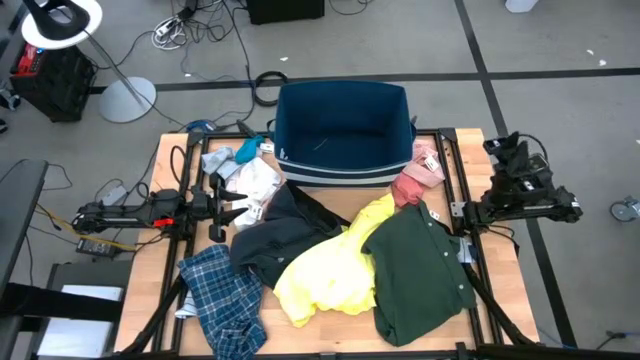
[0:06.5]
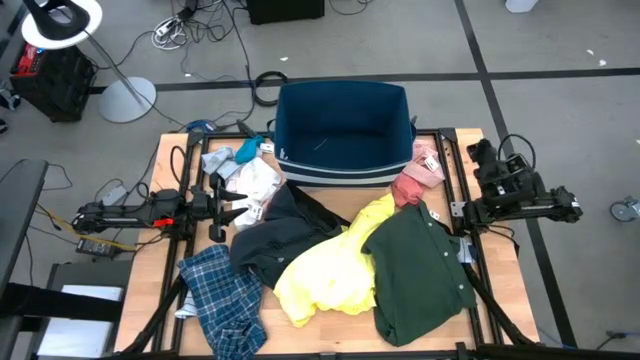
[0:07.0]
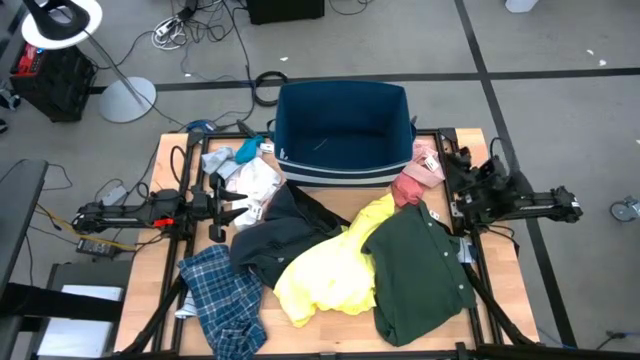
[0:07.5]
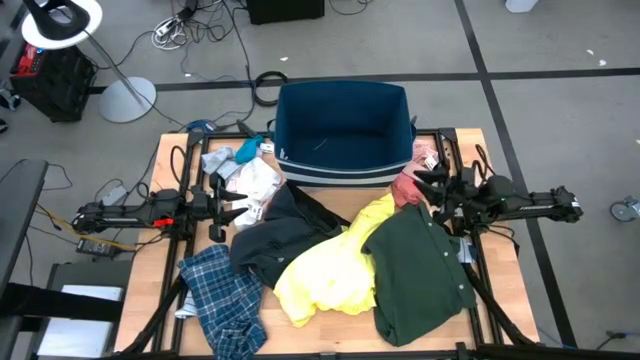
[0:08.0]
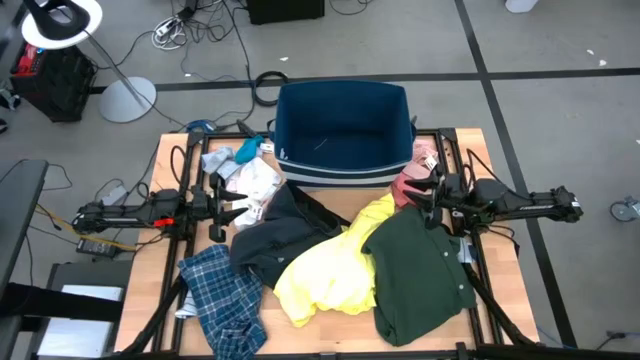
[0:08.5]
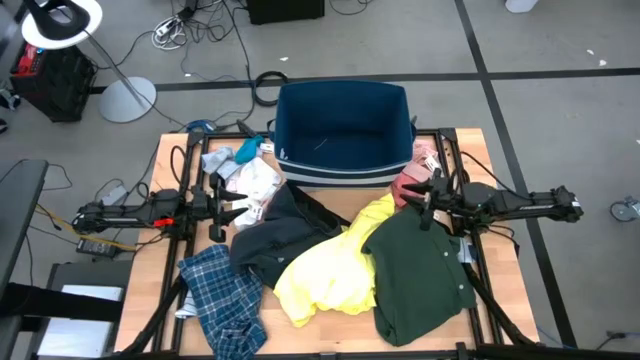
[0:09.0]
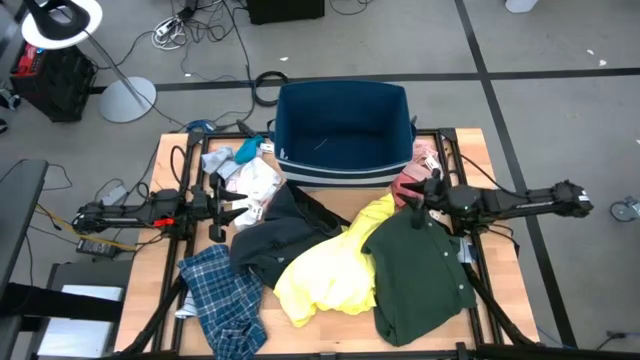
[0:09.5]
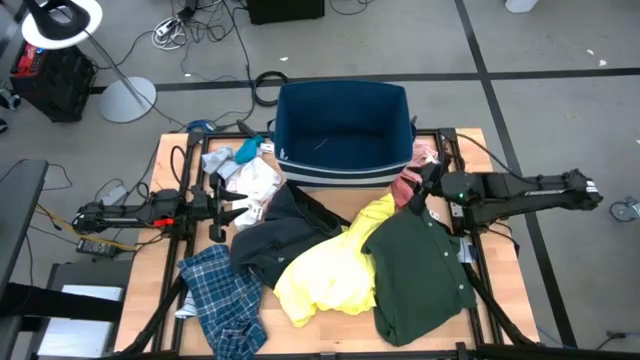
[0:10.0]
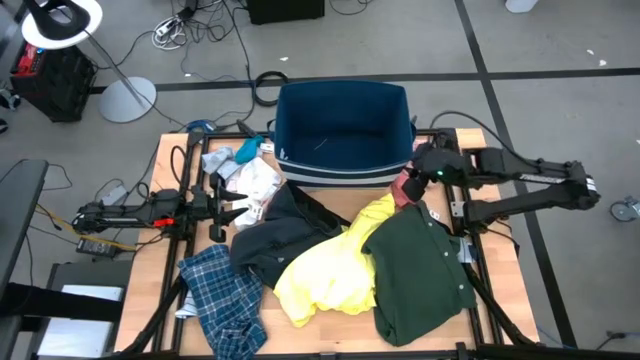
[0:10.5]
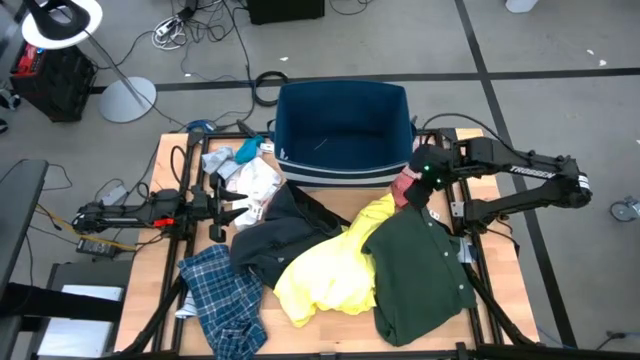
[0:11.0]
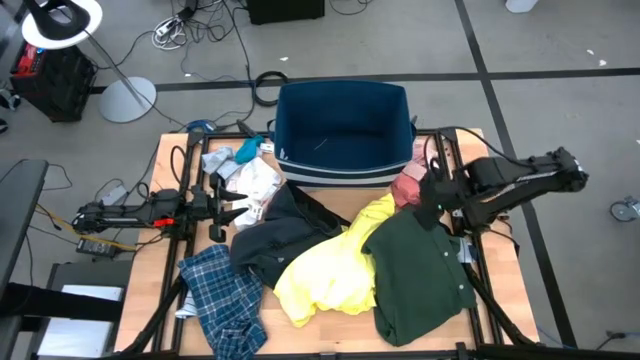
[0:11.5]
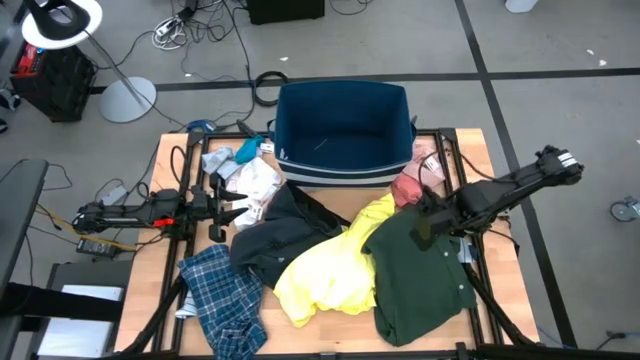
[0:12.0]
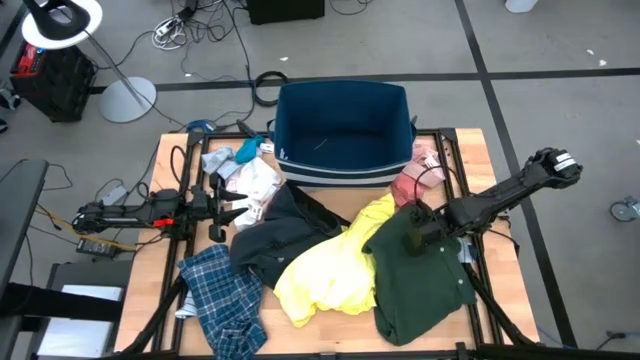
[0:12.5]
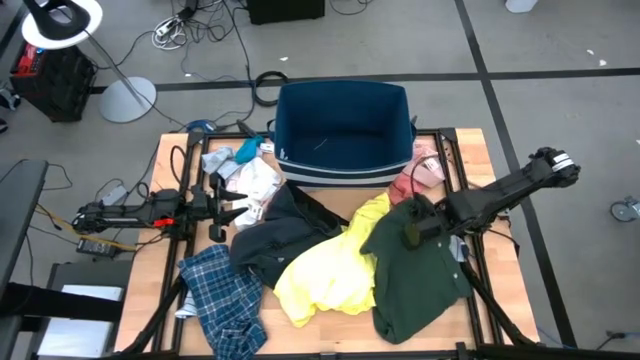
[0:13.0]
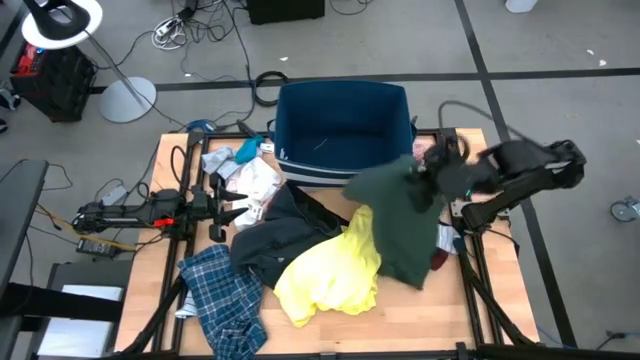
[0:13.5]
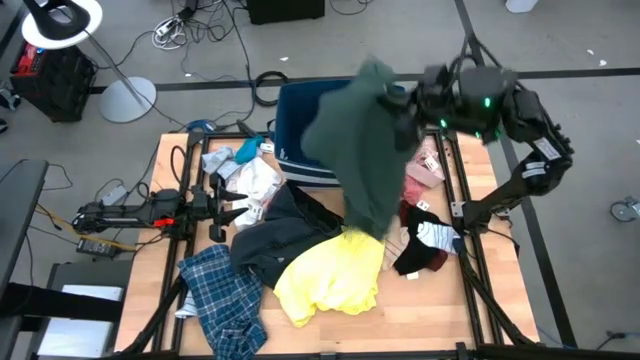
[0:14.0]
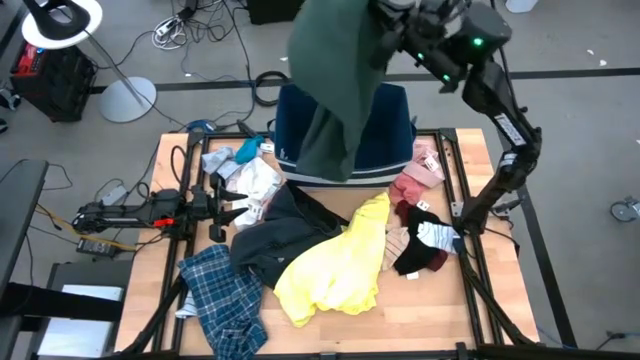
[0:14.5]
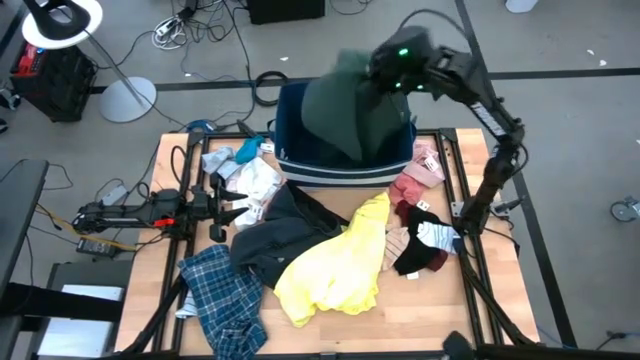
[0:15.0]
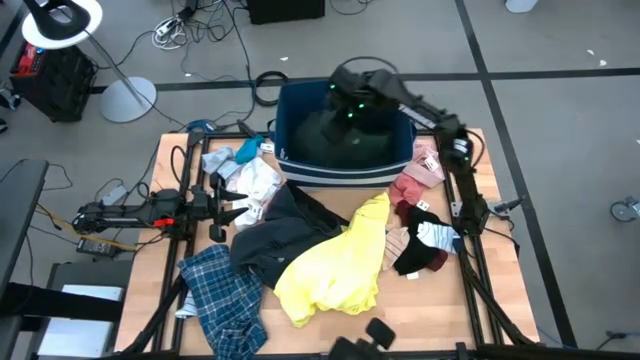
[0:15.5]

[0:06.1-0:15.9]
Task: Sort clothes
Put the green shirt into the blue bin

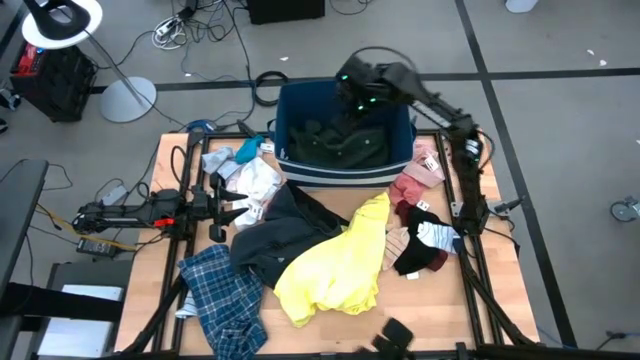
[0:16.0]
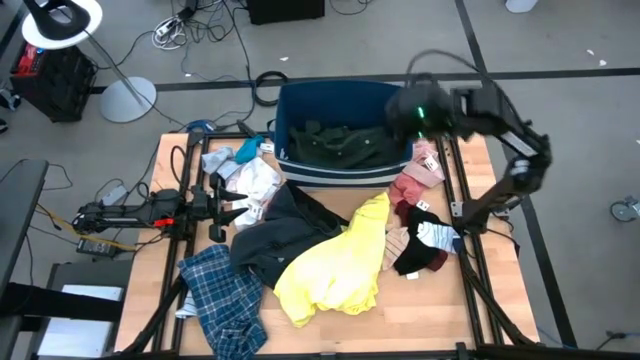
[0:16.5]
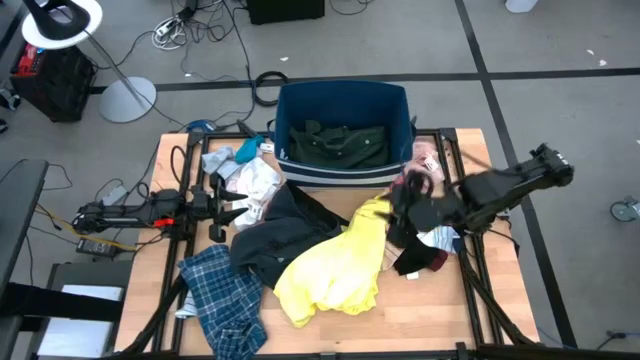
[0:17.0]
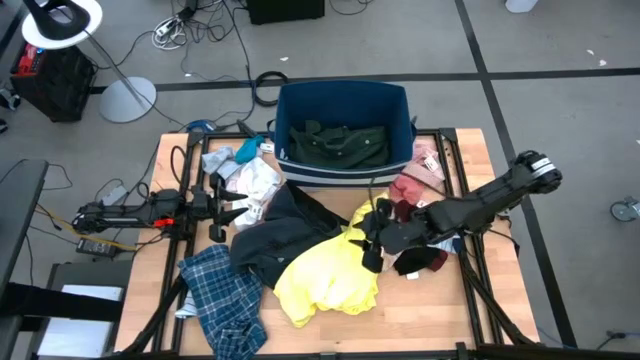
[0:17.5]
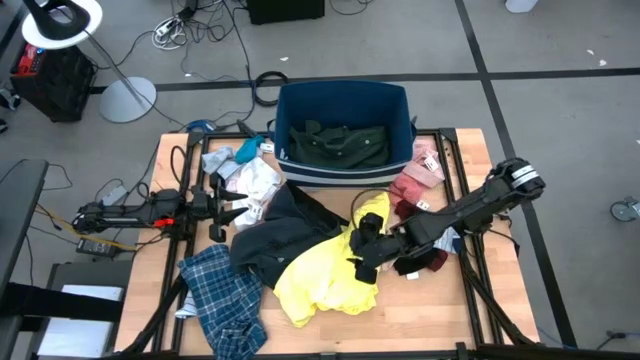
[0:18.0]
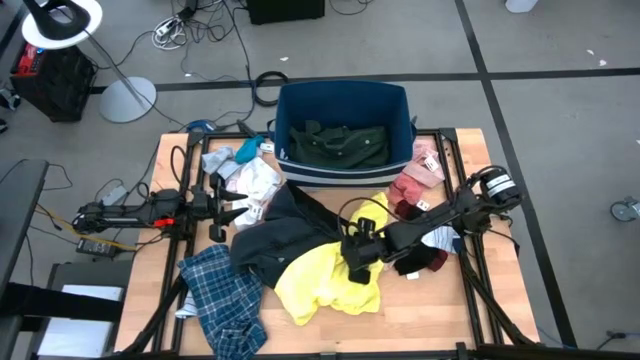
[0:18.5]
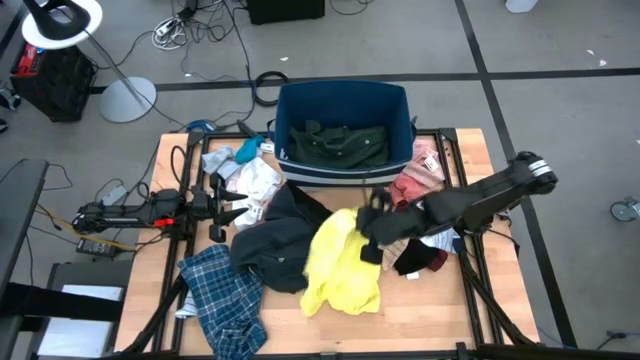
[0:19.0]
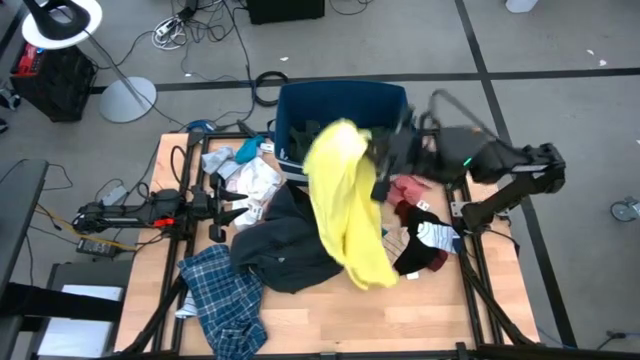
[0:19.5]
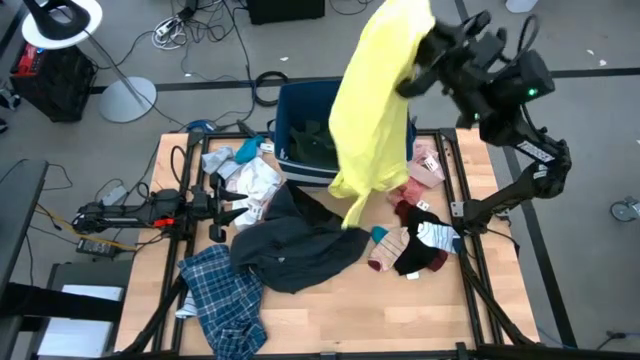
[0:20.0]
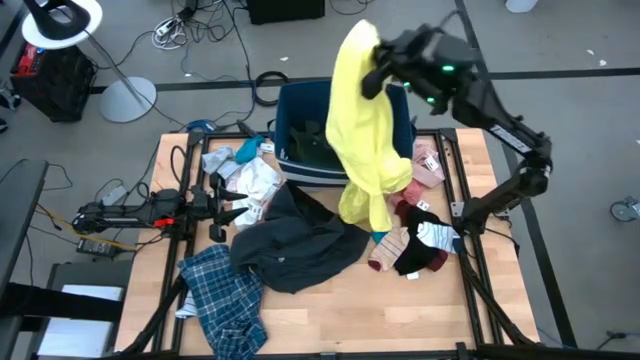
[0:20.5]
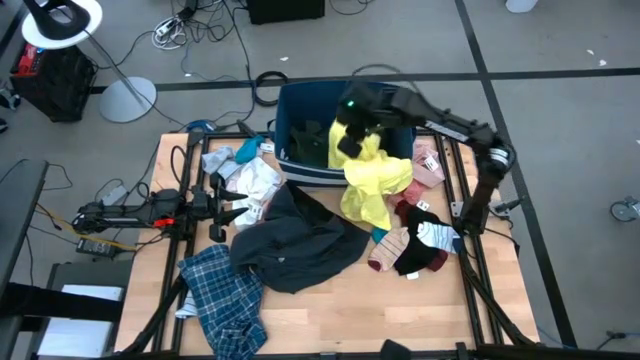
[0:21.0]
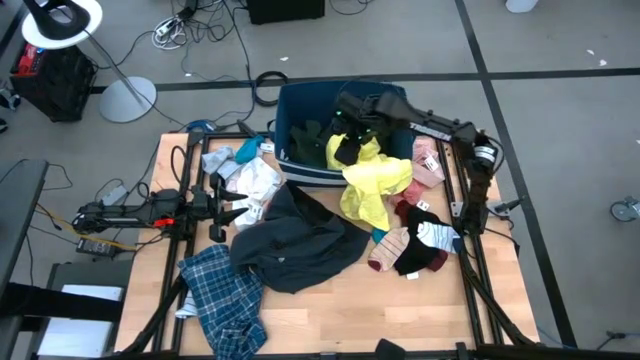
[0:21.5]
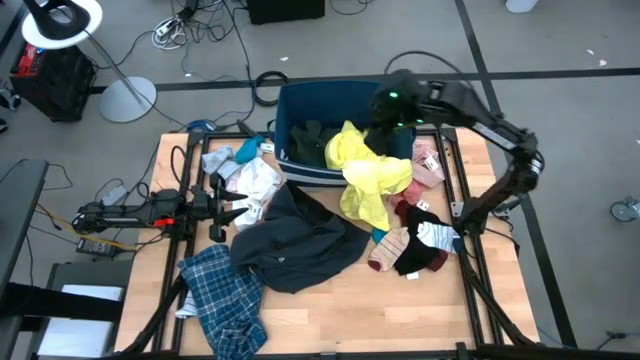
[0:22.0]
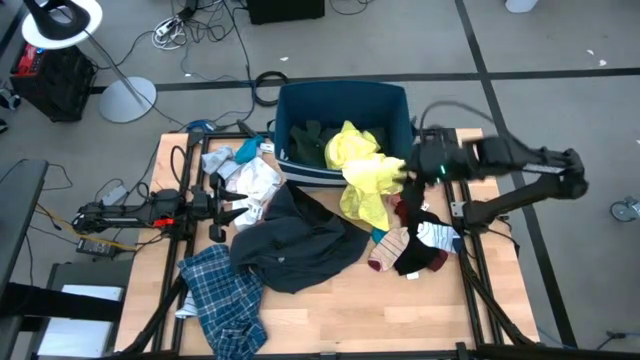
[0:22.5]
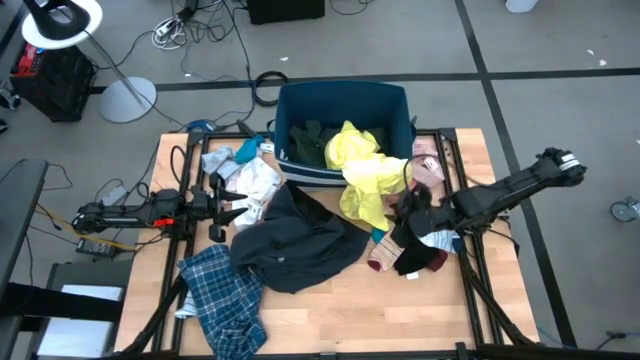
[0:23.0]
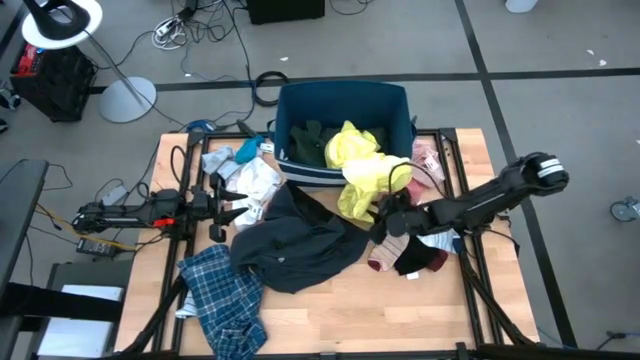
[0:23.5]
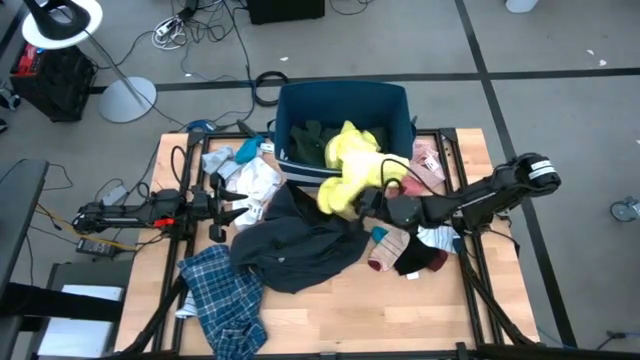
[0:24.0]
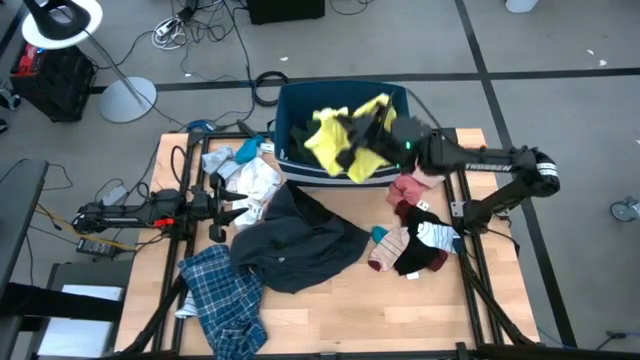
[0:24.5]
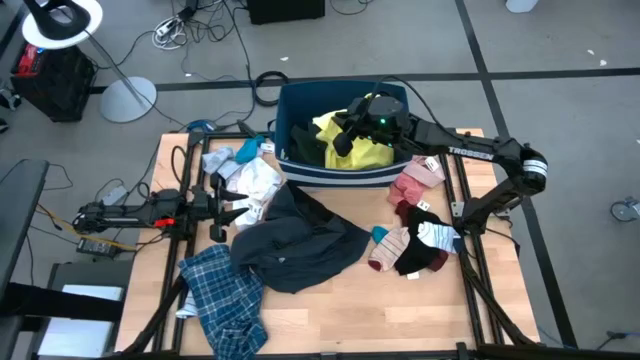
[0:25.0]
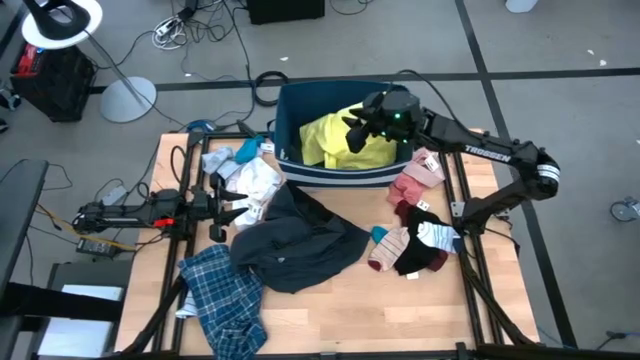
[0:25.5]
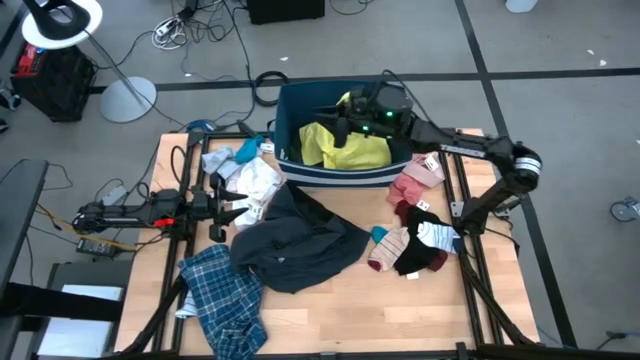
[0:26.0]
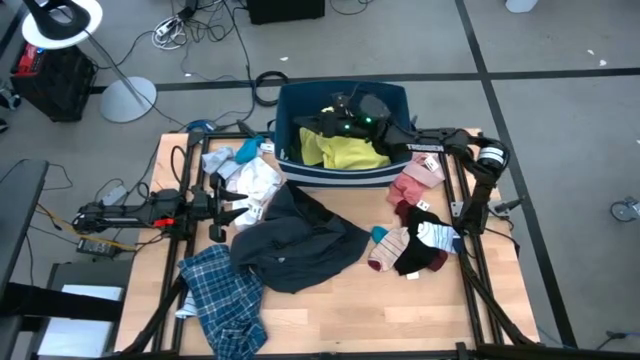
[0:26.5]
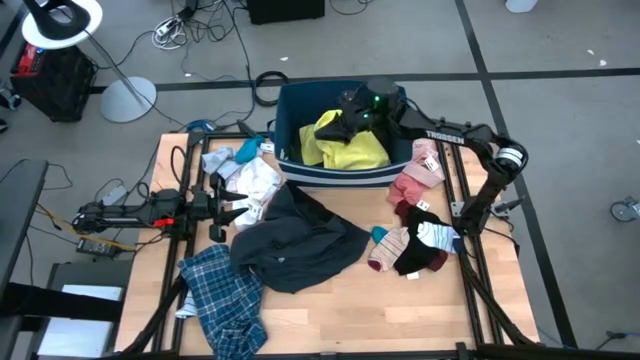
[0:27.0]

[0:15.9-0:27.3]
Put the yellow shirt into the blue bin
